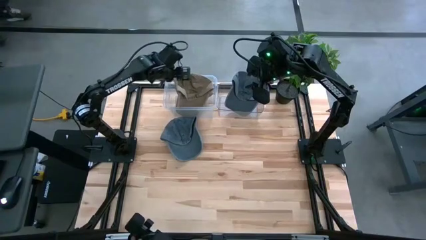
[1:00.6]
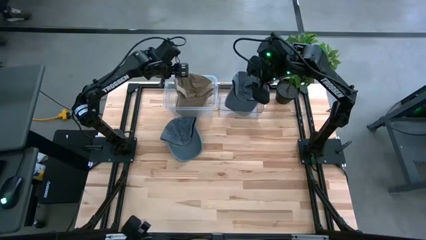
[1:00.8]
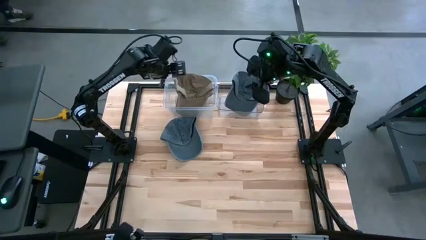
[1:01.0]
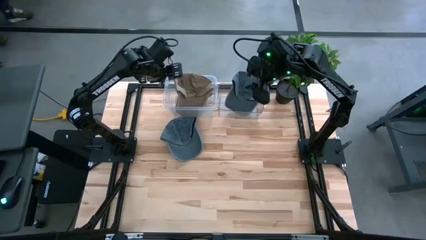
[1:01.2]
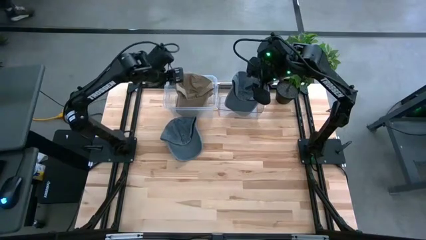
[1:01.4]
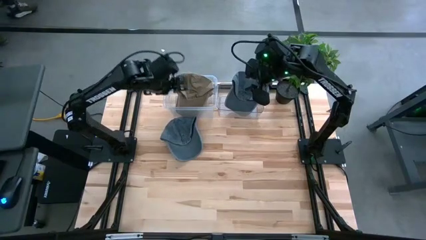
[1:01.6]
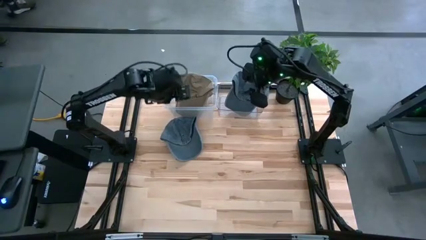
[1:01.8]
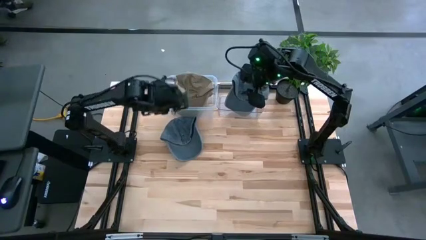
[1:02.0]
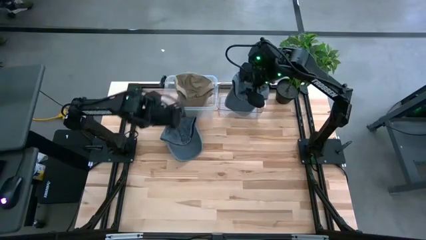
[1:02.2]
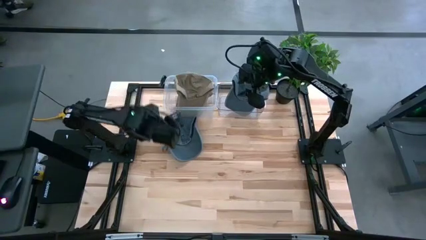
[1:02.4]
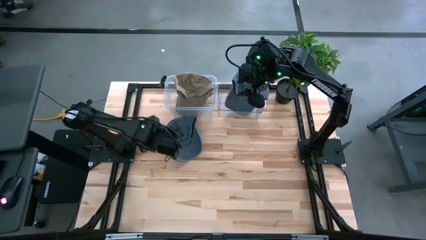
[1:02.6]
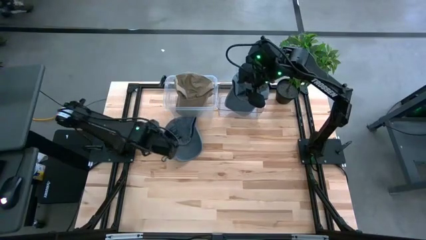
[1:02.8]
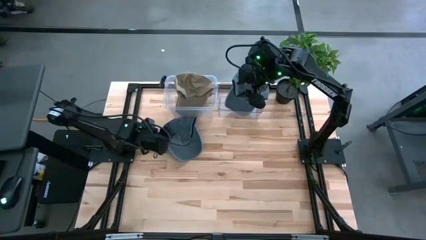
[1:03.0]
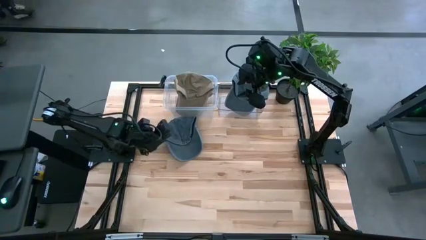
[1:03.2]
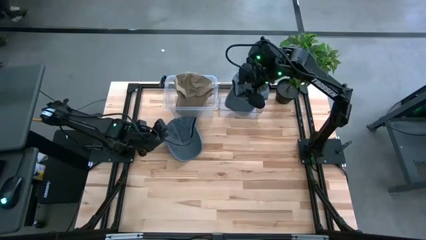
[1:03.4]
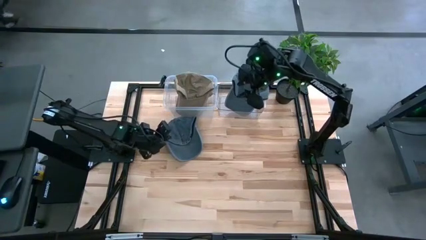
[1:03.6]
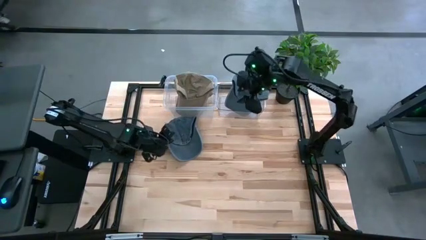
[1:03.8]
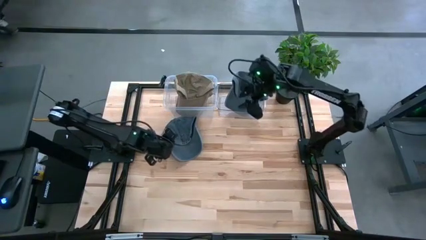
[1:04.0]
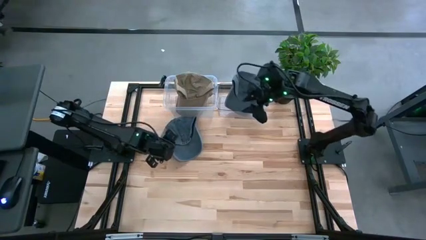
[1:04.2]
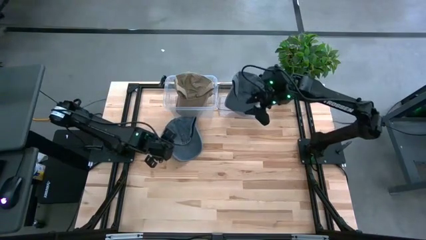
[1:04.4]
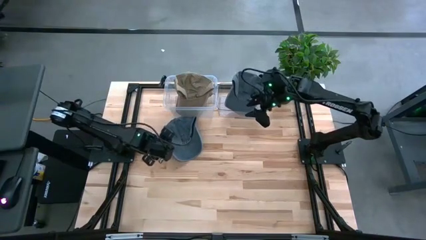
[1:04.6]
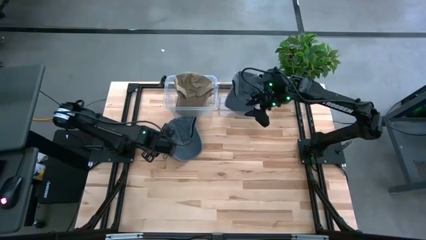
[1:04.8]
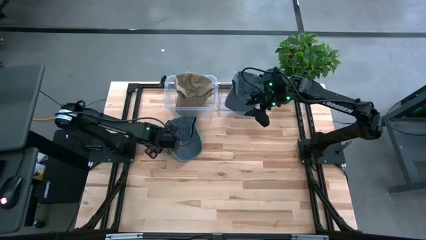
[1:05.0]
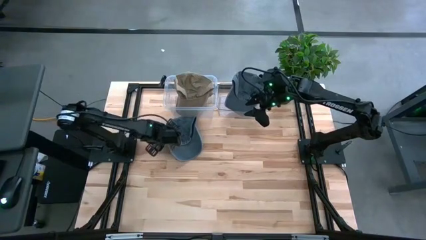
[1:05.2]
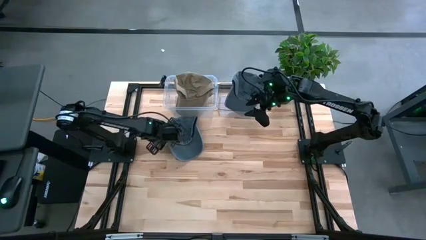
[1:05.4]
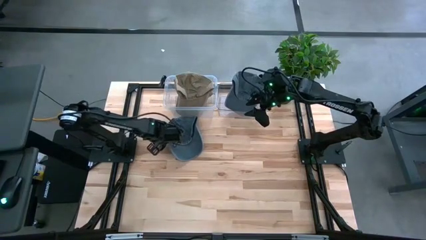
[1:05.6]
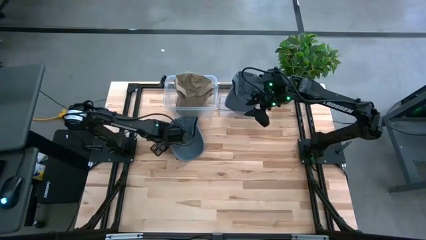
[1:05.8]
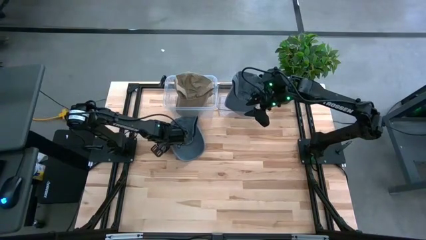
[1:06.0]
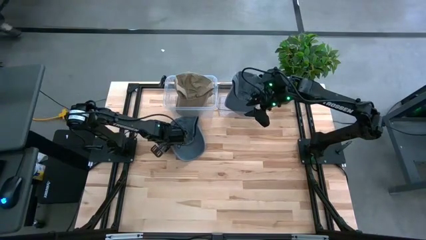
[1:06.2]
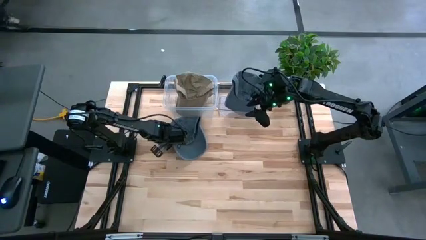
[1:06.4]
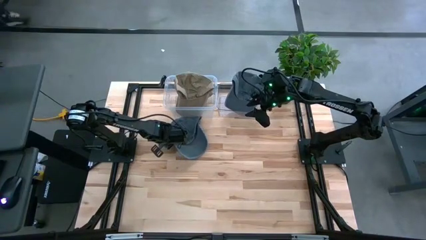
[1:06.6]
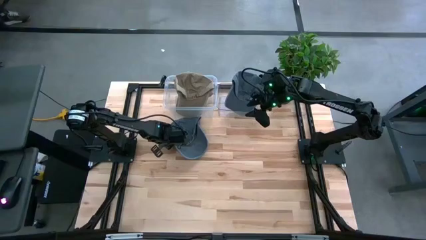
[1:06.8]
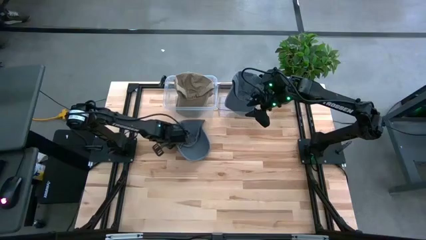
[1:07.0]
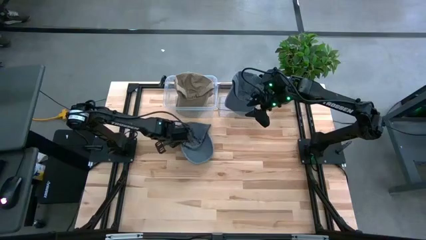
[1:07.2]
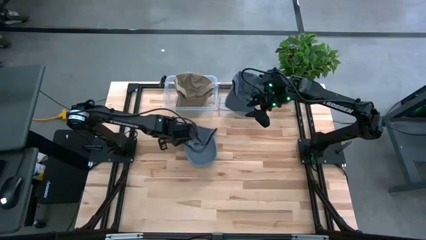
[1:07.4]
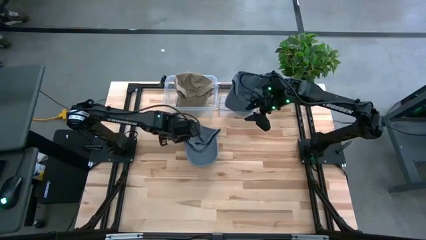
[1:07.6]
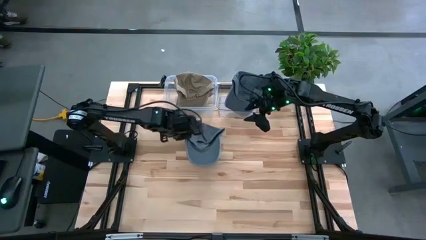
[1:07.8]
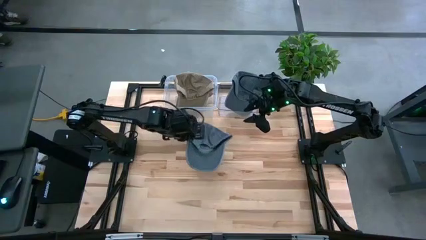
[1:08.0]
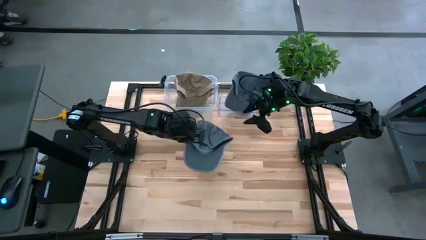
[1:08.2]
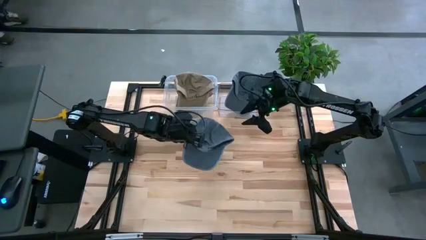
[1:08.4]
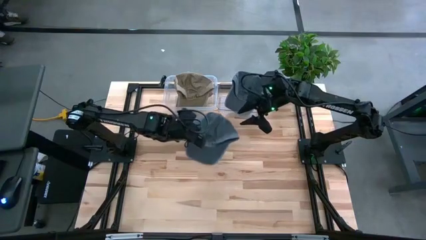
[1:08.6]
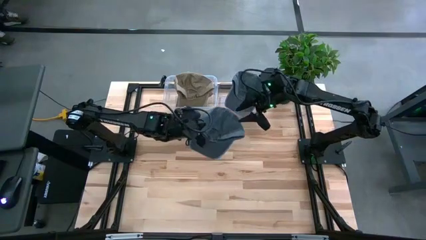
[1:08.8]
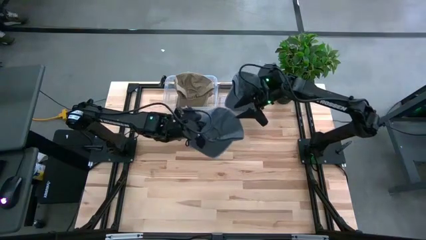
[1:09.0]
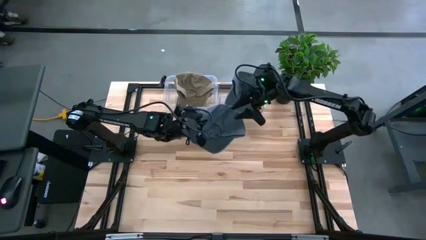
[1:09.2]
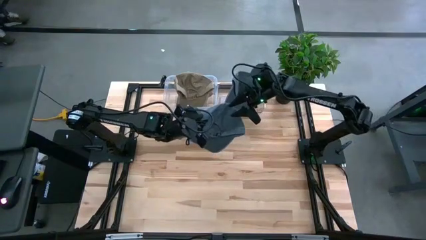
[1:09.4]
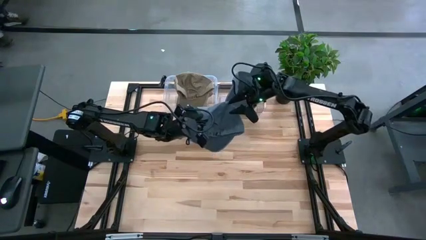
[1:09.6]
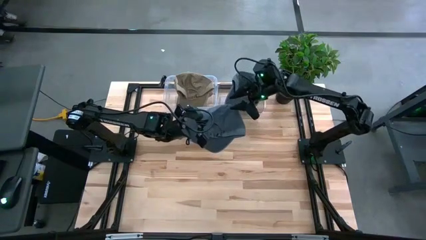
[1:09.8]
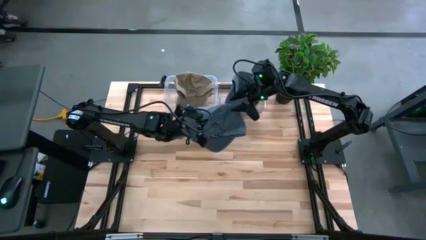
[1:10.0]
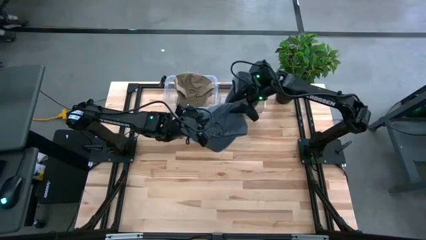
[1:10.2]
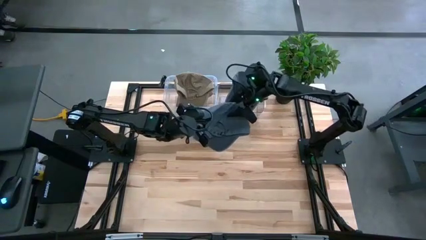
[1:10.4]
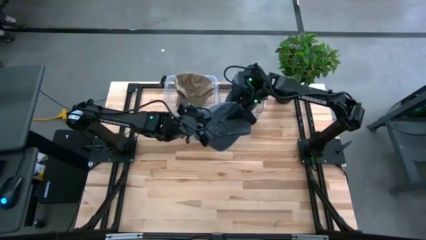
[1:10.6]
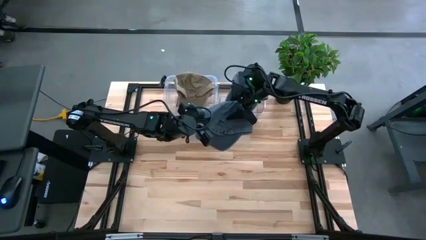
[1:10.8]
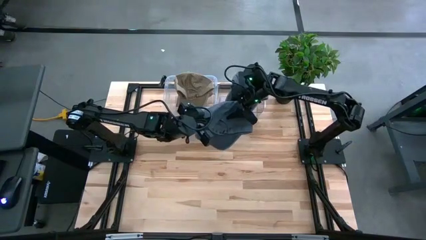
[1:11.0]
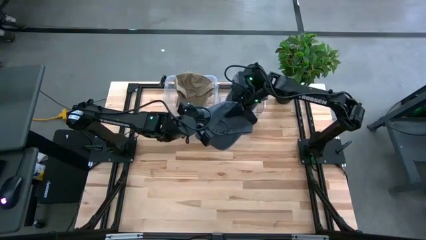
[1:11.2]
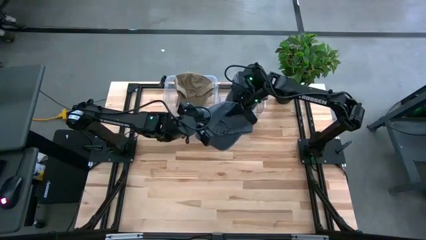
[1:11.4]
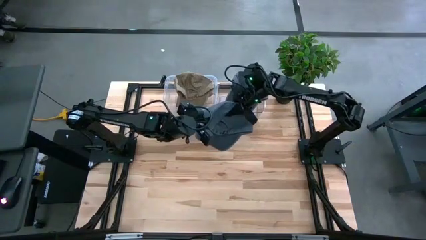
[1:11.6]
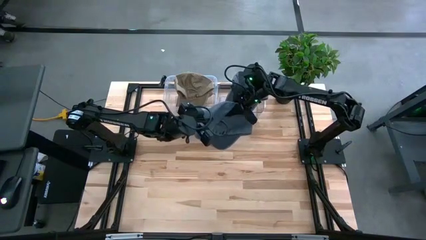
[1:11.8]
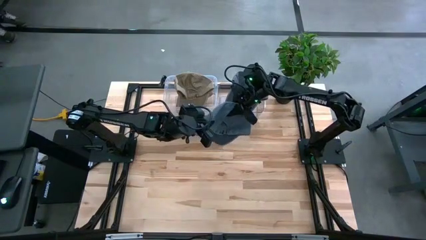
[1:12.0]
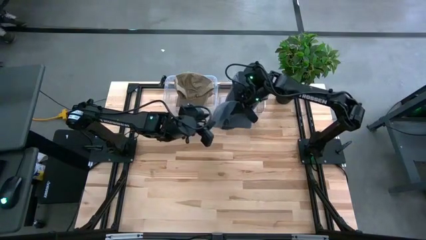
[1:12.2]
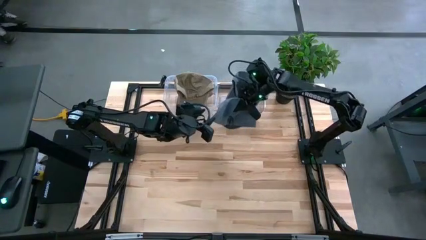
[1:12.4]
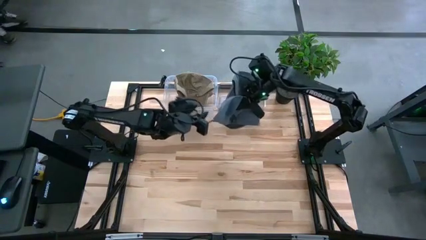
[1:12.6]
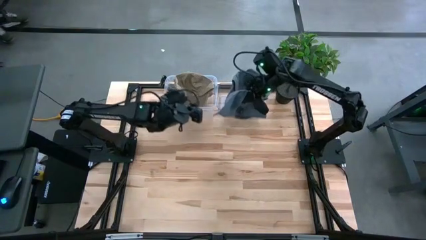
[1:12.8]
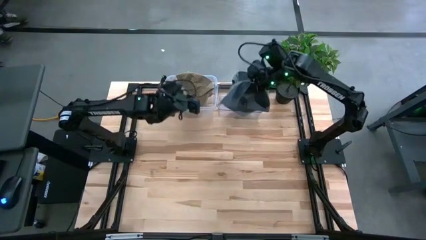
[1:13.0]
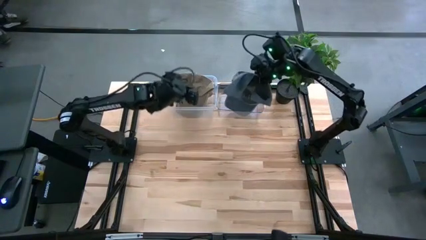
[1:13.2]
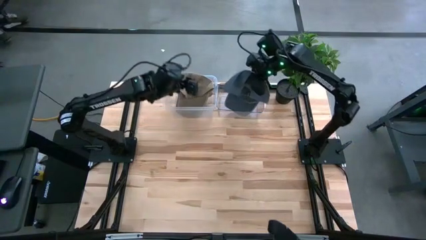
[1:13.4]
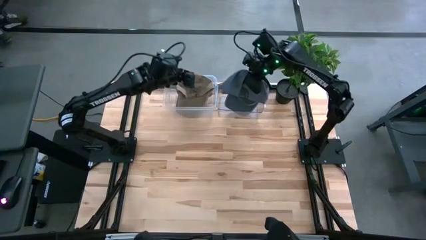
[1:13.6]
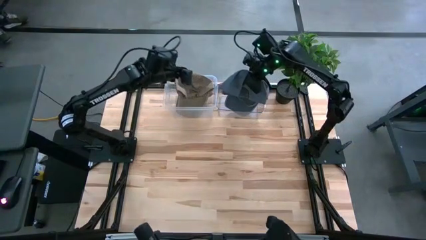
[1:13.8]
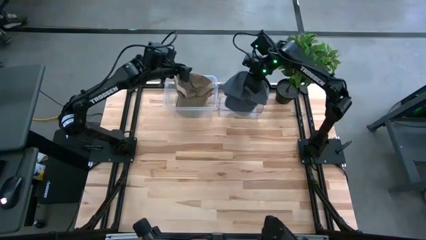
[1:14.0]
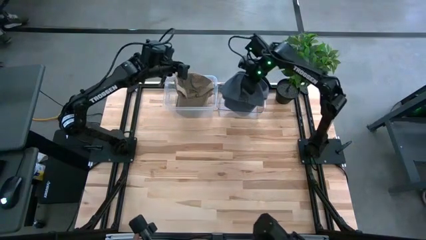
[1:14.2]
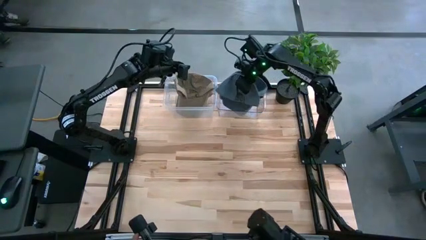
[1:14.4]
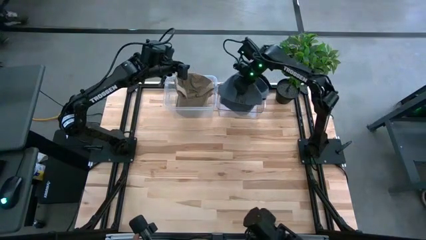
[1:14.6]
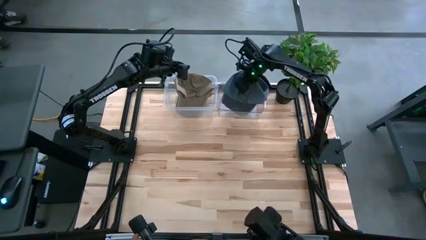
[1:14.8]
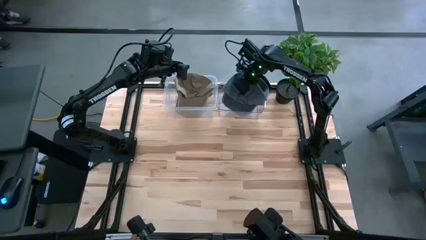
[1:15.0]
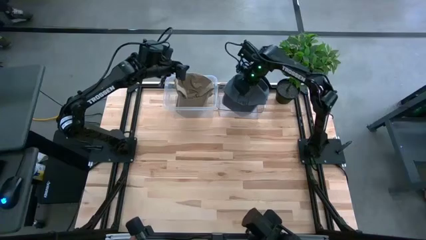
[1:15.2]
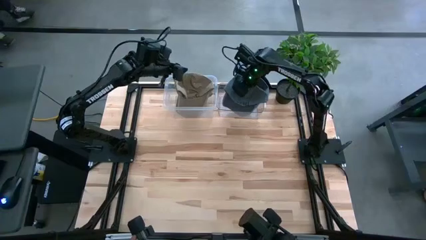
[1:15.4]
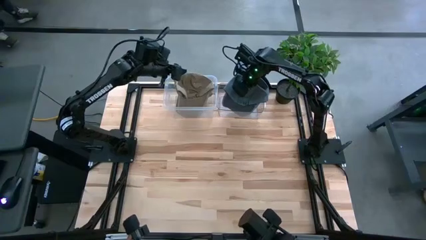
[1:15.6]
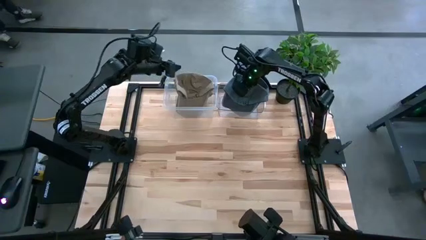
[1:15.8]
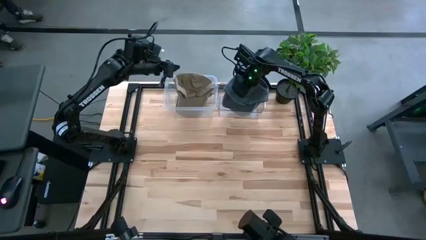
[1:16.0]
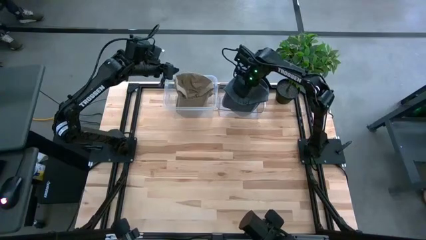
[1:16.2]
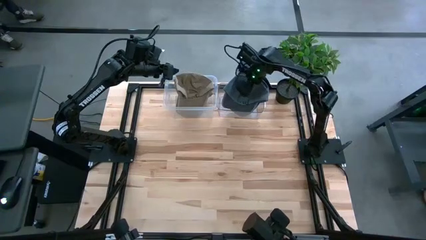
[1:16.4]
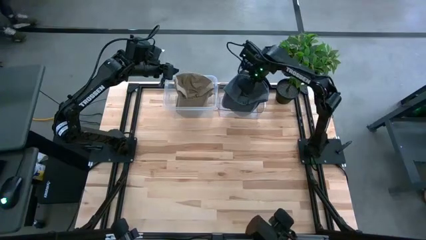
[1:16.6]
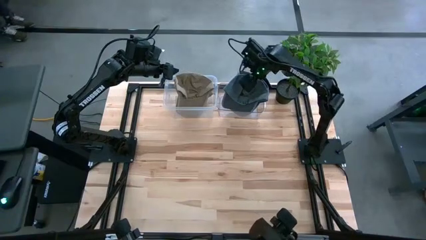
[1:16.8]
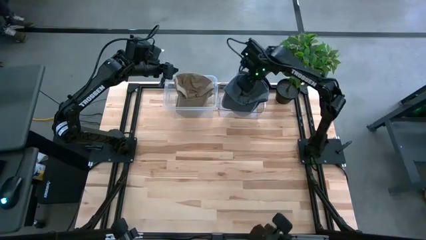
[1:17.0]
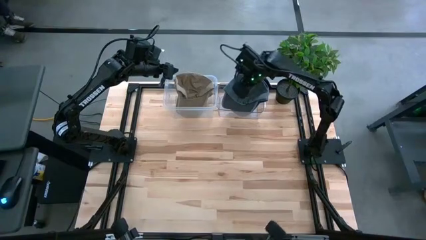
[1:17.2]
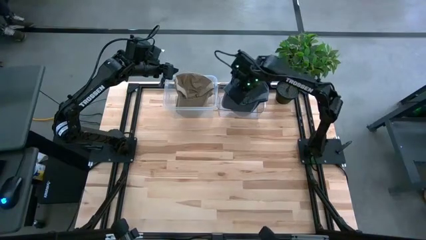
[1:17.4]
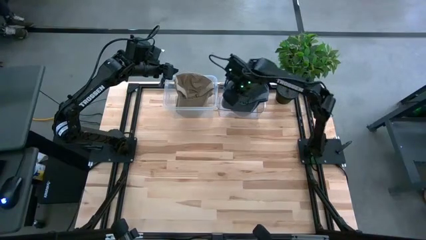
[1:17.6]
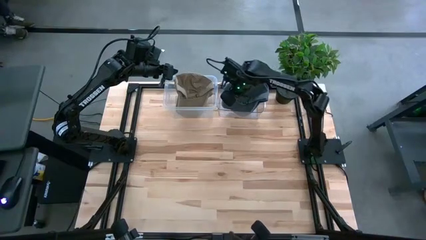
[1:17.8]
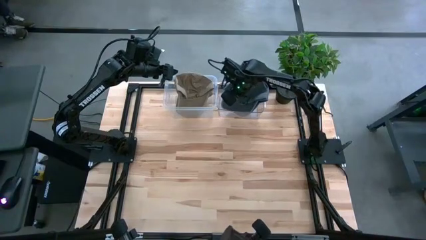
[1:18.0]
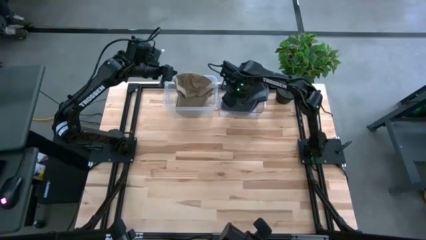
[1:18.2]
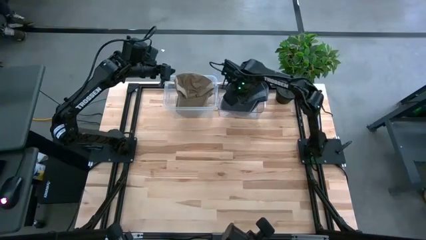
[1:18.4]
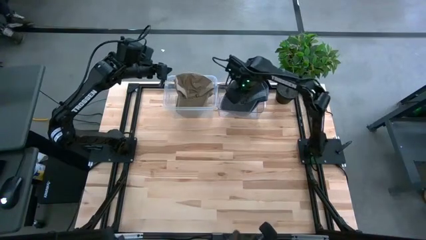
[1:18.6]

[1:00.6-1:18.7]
Task: Pick & Place hat
Put the gray cap into the transparent bin
